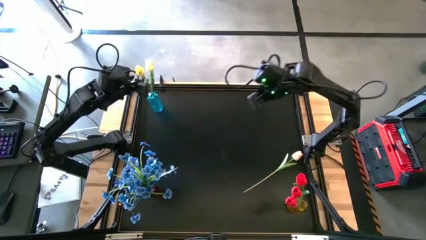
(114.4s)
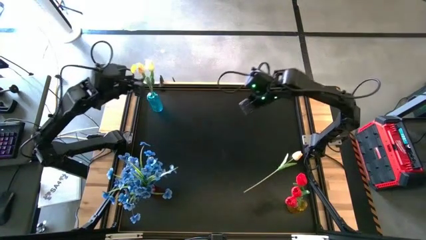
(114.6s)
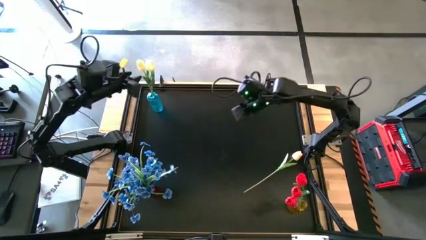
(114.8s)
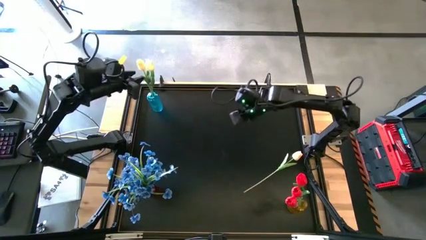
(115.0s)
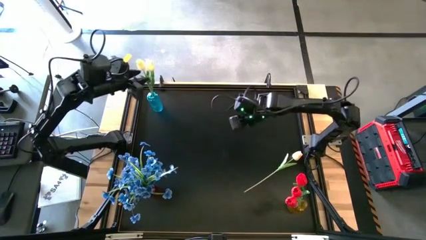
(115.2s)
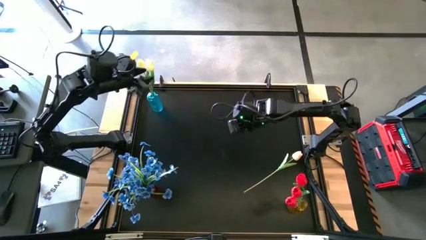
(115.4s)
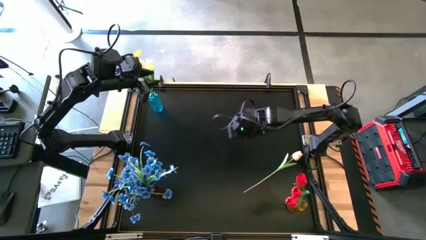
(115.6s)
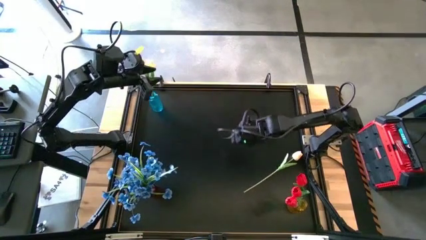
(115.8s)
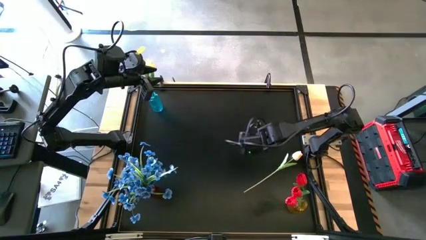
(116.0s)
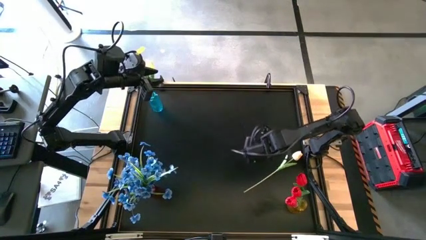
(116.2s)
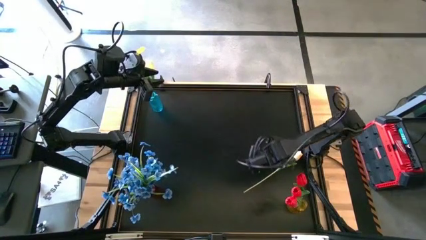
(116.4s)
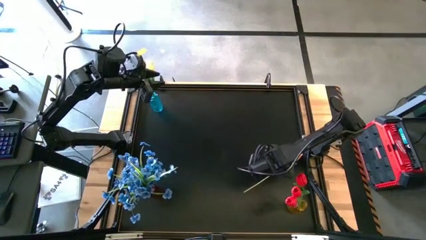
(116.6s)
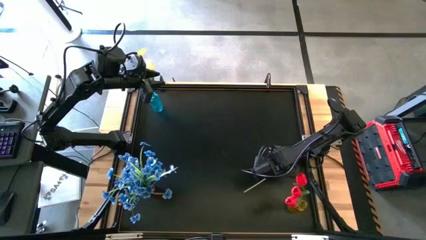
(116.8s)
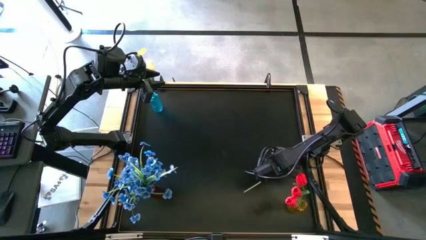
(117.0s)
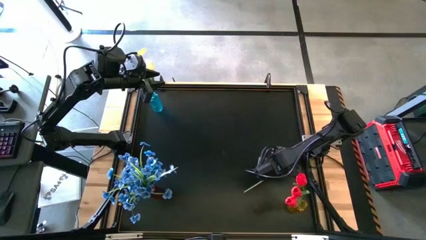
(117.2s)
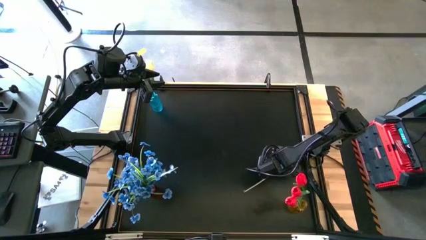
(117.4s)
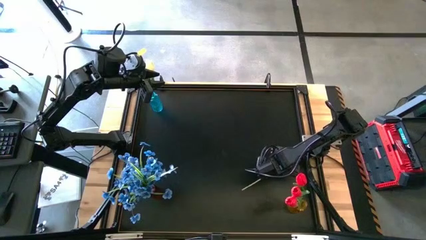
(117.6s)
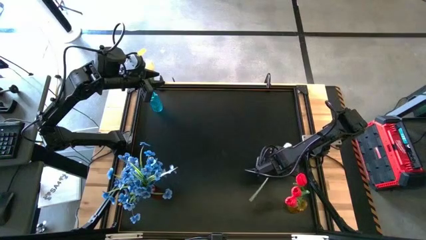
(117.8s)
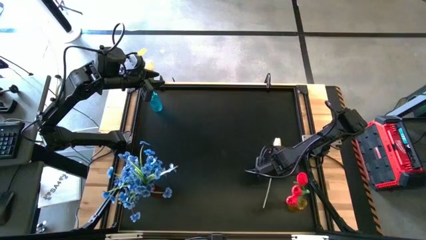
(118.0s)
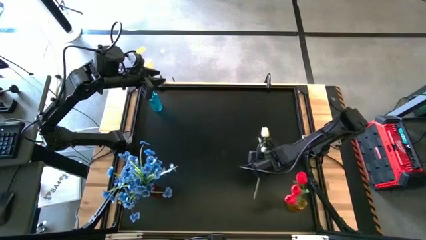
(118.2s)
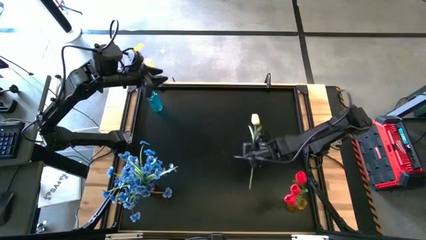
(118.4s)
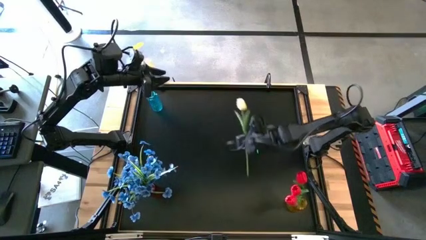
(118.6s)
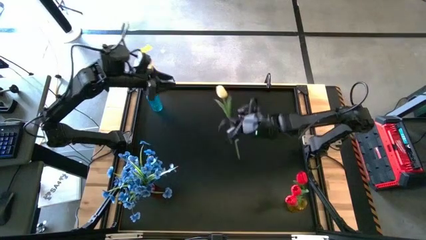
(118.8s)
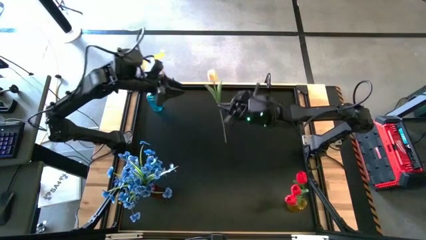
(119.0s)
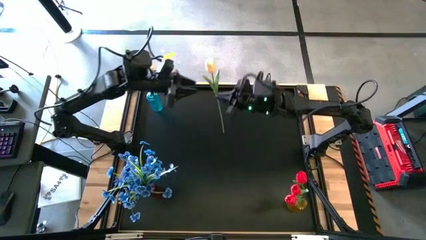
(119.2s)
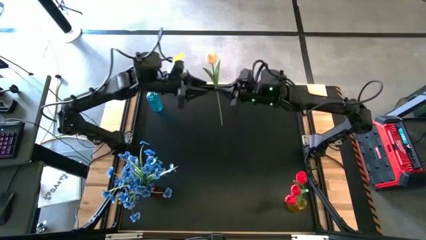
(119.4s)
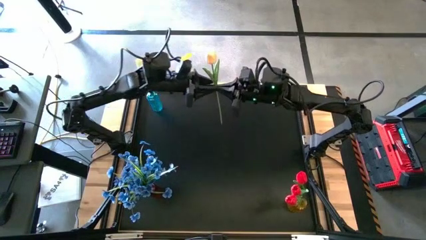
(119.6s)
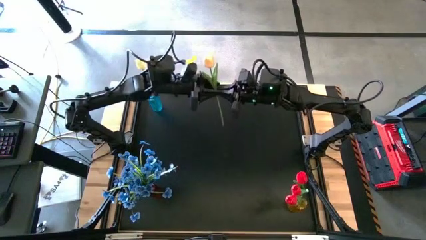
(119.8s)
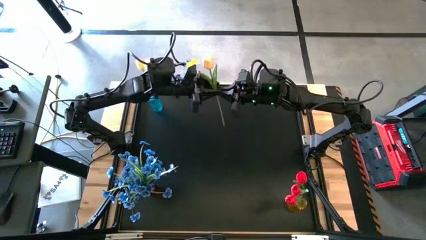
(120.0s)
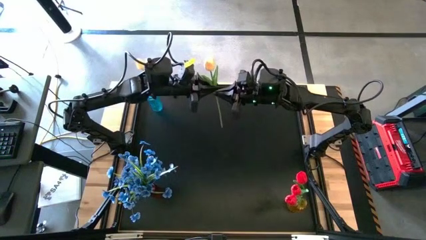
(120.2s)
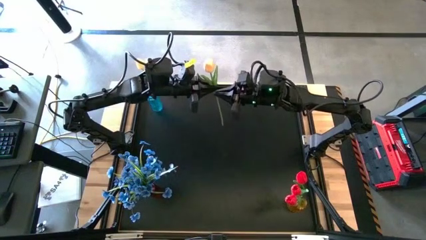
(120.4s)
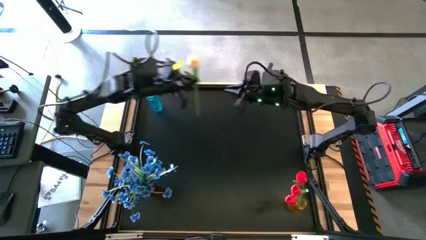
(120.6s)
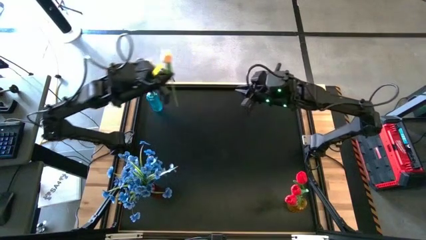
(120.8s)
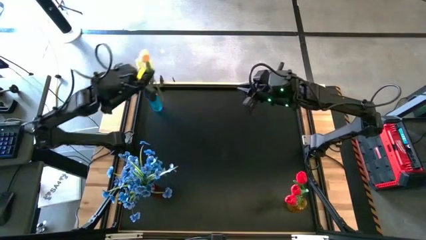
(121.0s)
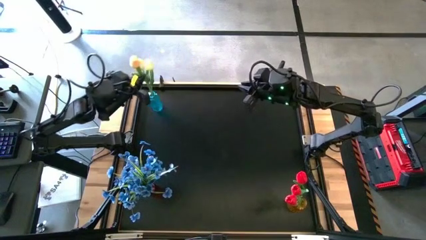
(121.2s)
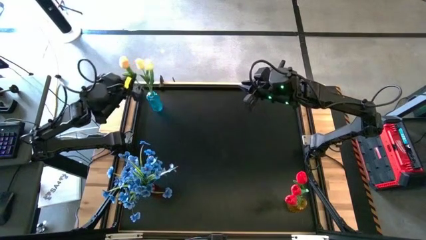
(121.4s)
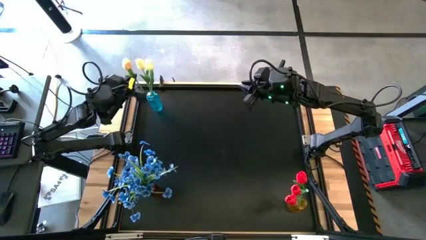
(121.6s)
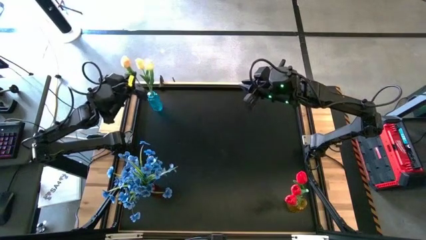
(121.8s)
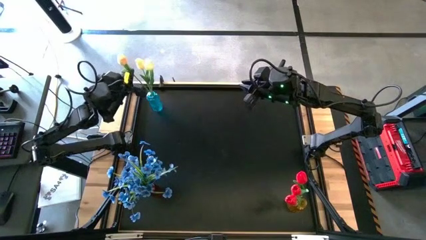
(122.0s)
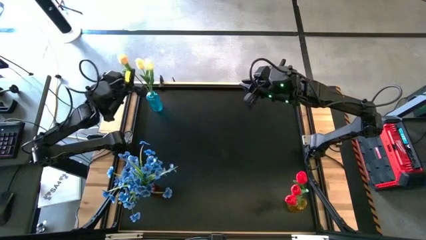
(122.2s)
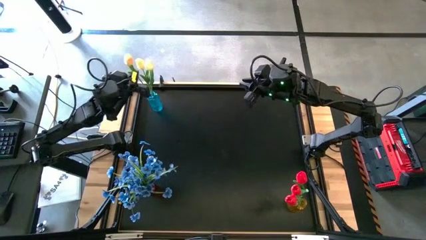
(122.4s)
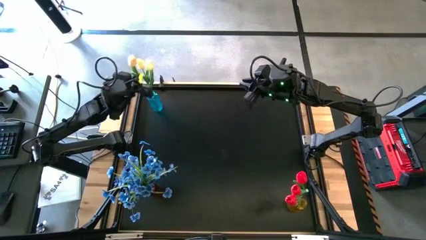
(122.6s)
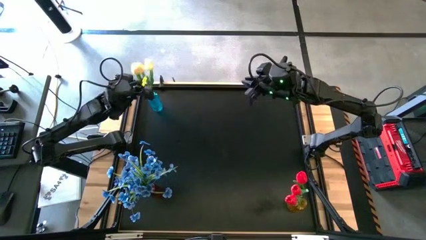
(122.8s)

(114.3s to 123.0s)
Task: Sort flowers into vase by color
Put the white flower into the blue vase

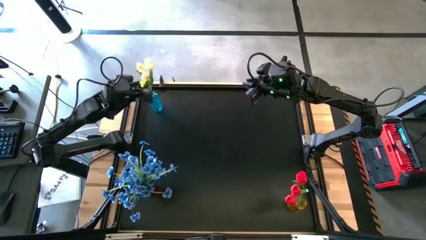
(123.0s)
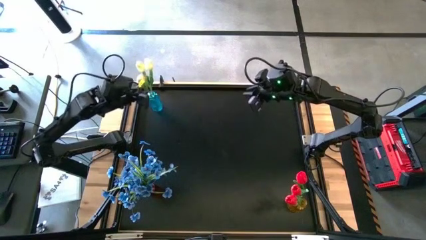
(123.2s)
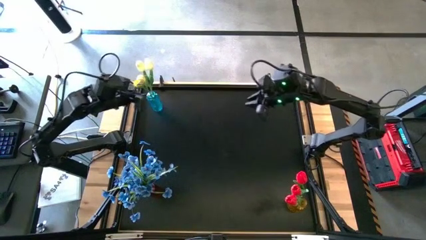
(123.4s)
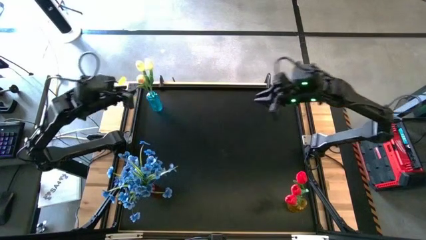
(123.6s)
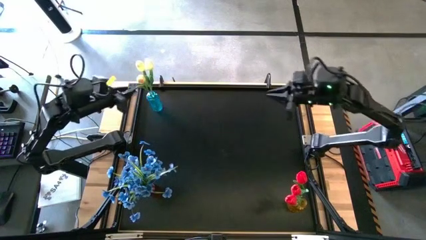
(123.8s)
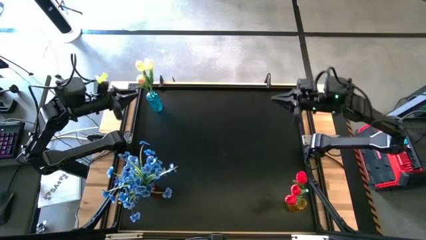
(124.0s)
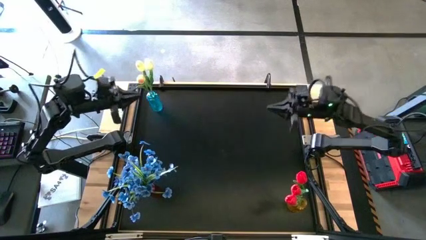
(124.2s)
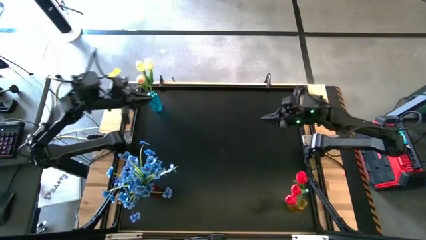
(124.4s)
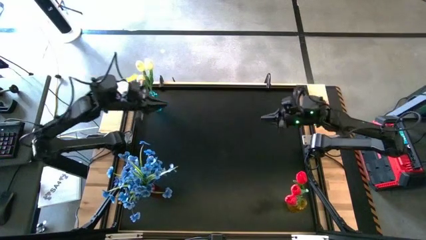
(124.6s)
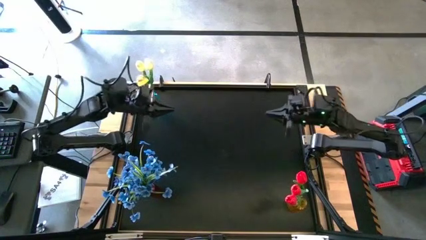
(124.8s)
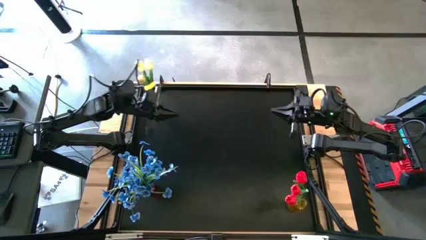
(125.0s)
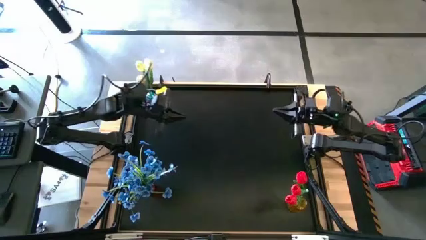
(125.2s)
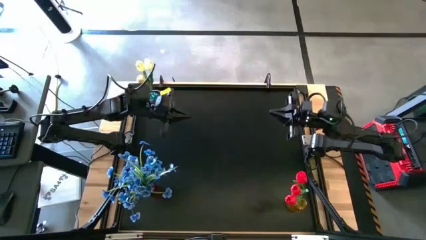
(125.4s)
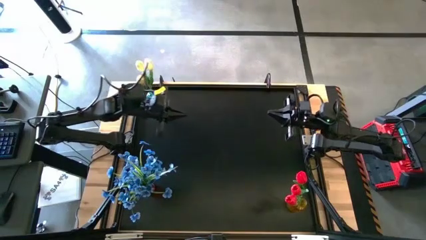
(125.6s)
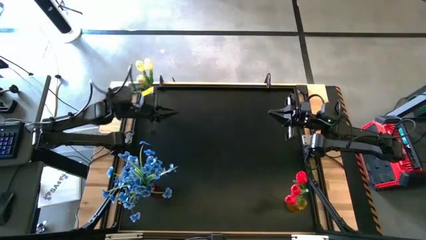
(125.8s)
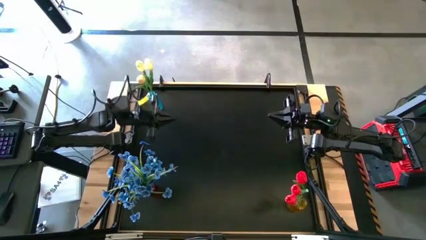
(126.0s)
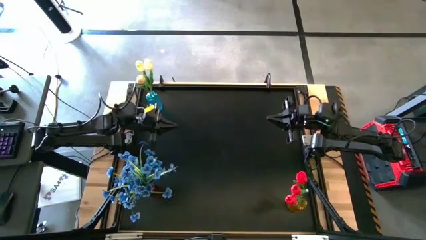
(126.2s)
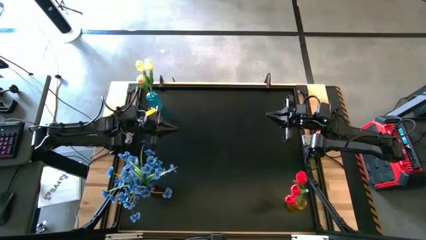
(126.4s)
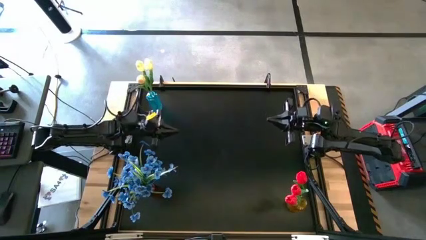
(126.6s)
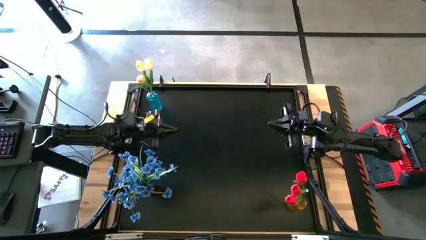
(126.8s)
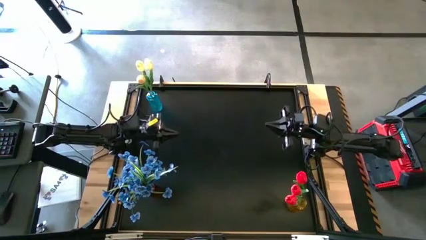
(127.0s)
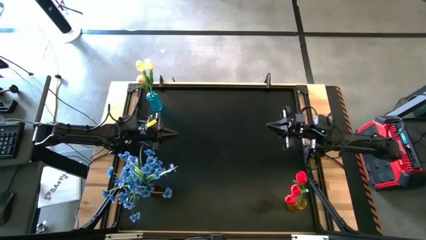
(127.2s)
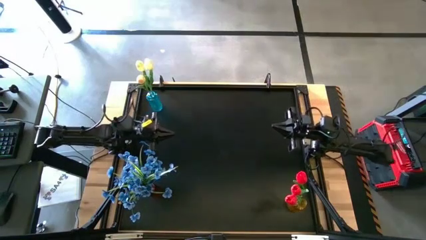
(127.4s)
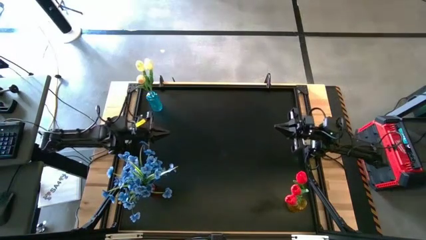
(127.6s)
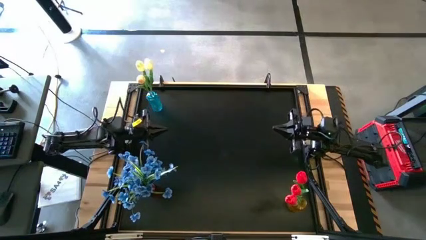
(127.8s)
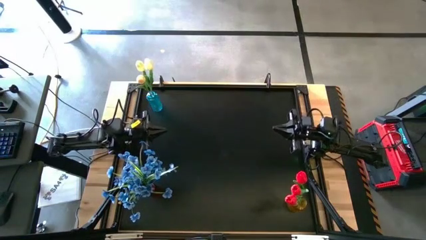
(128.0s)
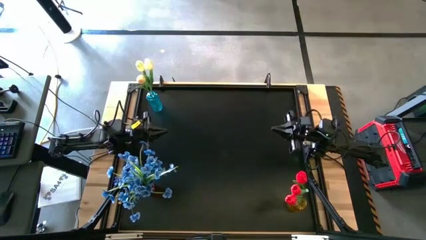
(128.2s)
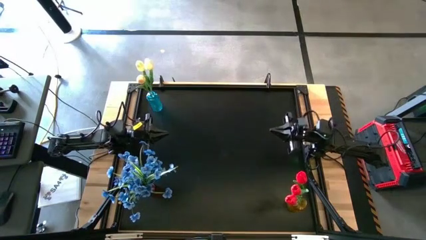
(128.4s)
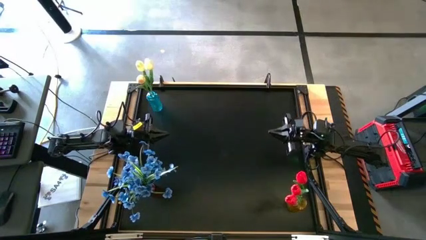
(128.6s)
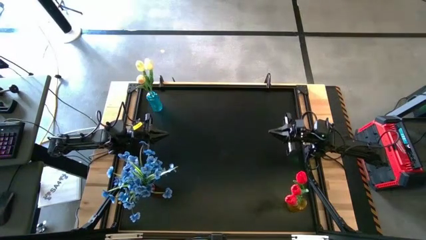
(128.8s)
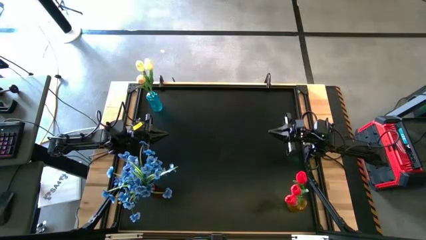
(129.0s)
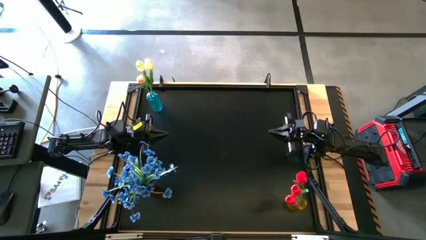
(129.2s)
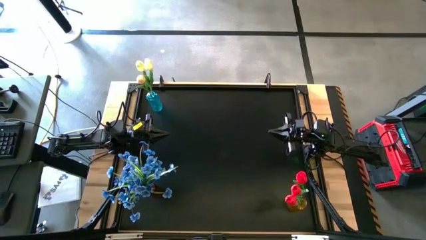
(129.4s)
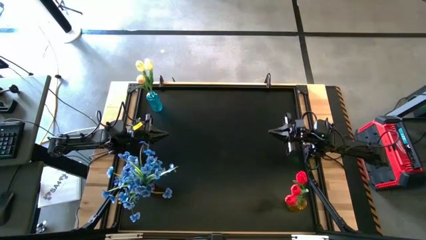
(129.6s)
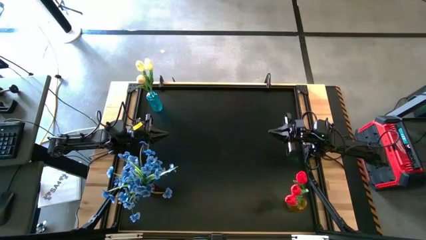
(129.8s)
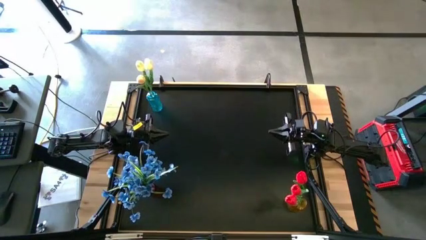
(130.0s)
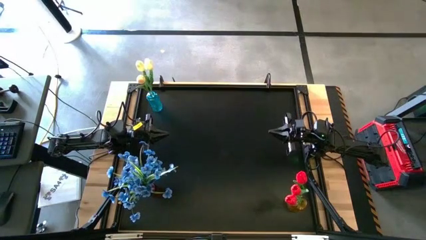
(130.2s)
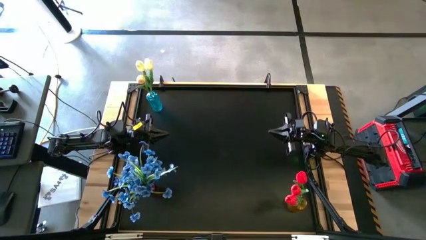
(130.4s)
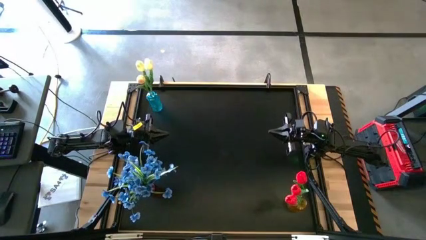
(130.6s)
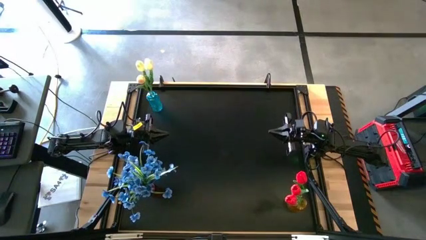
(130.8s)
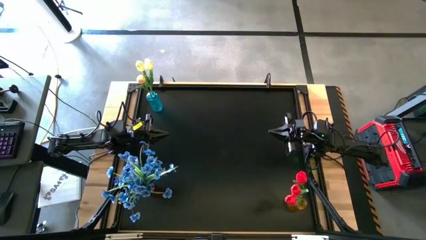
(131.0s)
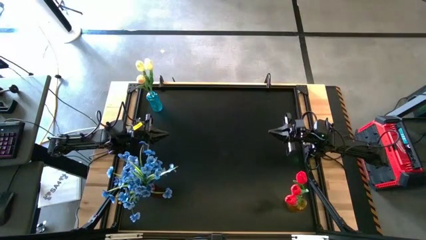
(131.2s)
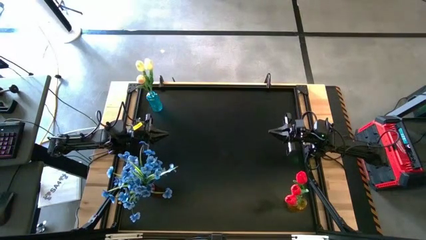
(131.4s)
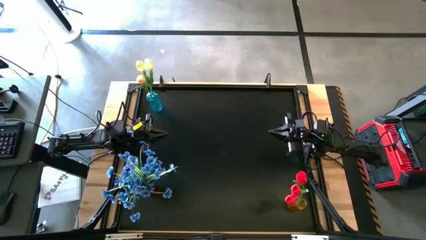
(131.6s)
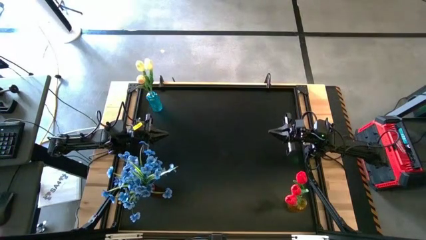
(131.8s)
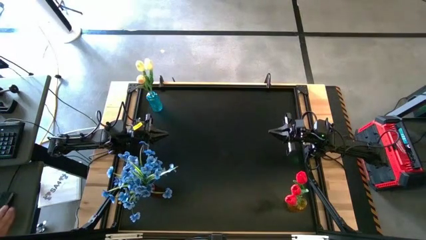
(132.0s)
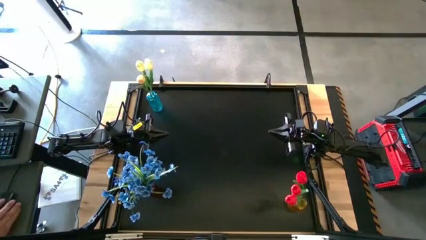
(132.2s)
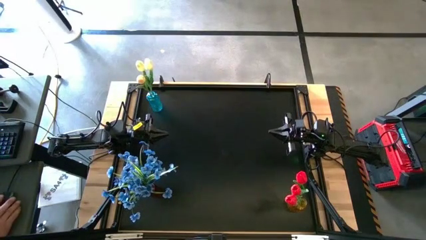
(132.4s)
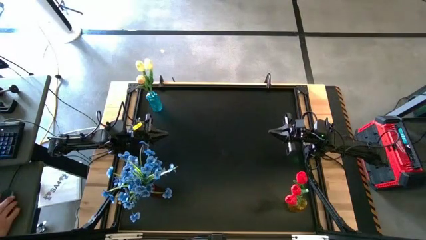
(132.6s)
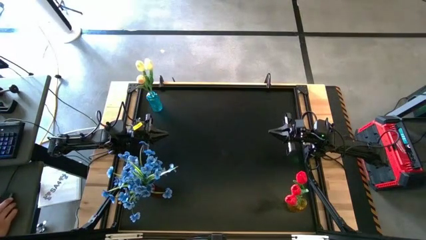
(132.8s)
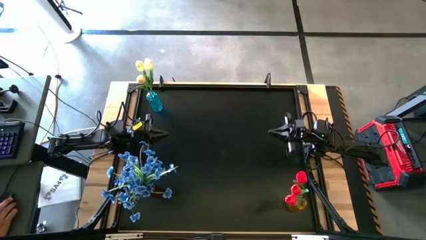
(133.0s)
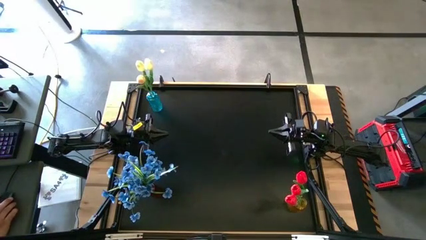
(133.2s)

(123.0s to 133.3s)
Return to Home Position
